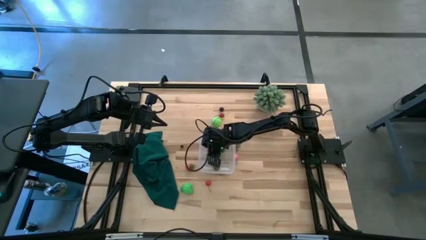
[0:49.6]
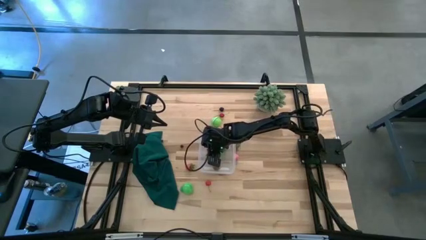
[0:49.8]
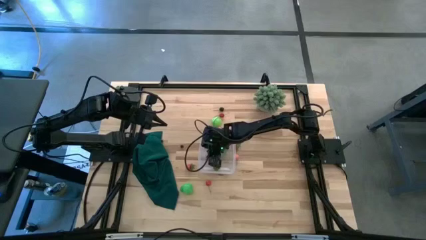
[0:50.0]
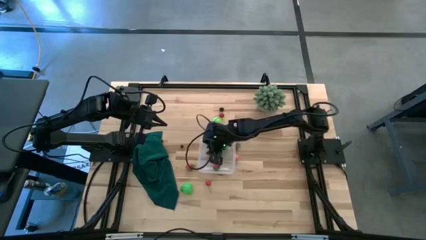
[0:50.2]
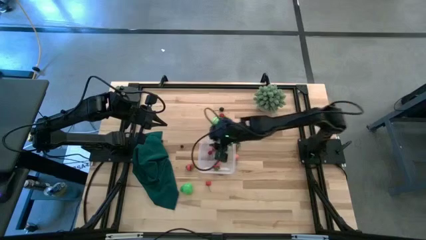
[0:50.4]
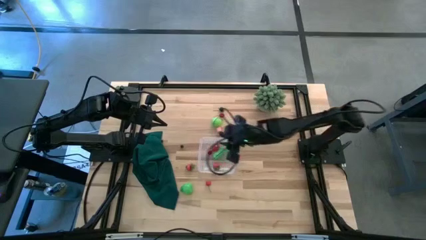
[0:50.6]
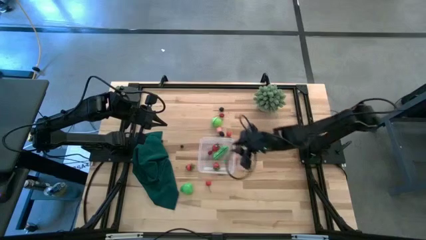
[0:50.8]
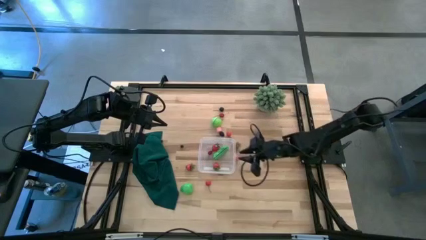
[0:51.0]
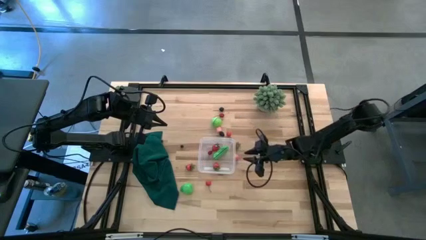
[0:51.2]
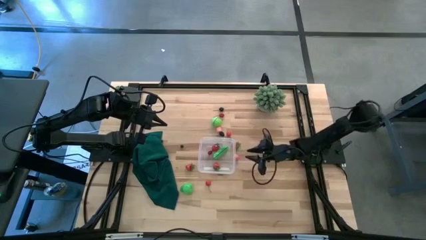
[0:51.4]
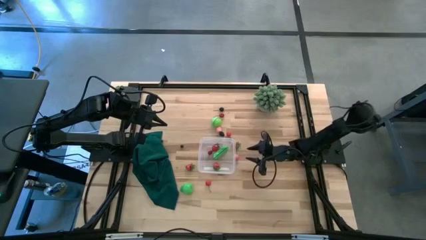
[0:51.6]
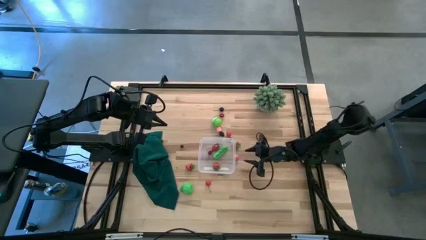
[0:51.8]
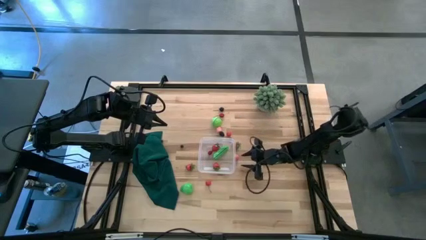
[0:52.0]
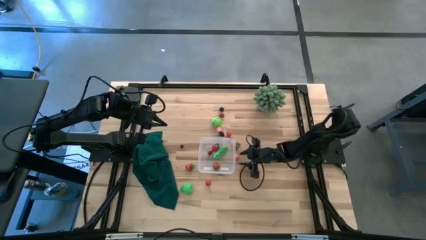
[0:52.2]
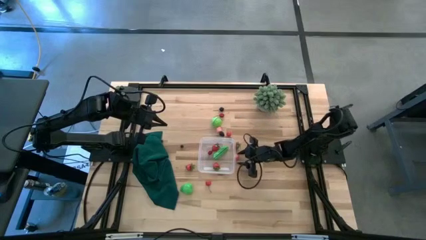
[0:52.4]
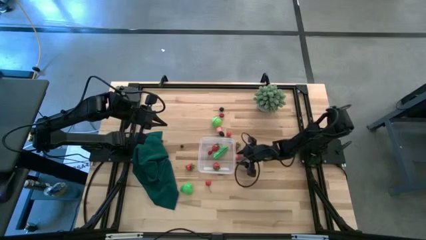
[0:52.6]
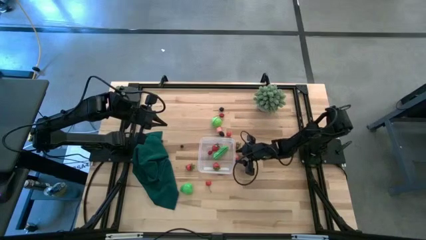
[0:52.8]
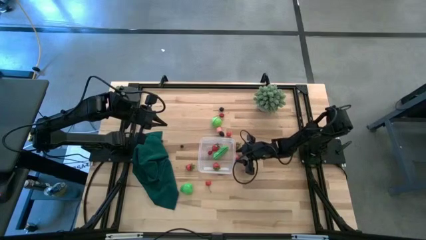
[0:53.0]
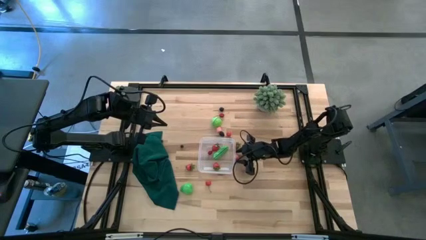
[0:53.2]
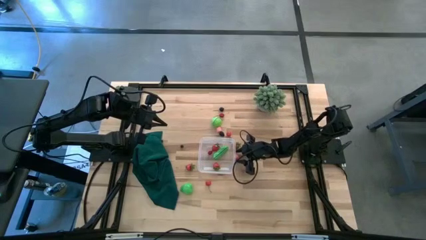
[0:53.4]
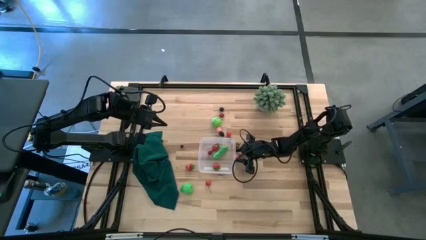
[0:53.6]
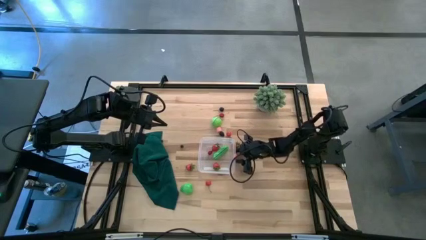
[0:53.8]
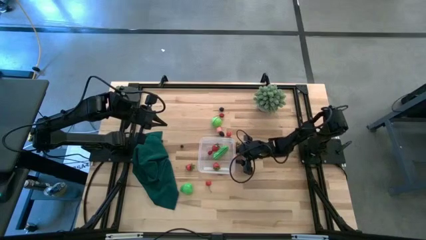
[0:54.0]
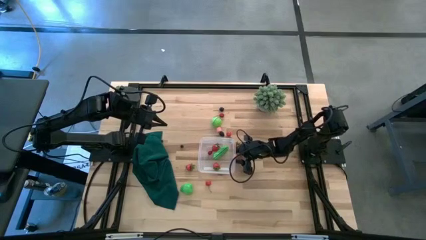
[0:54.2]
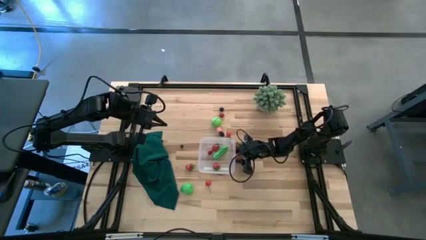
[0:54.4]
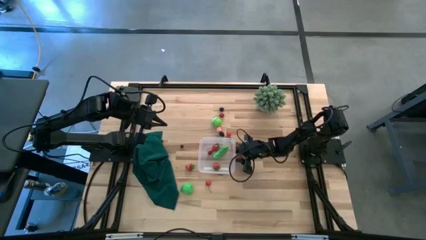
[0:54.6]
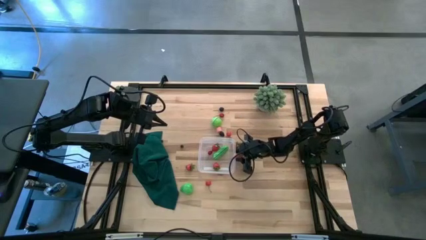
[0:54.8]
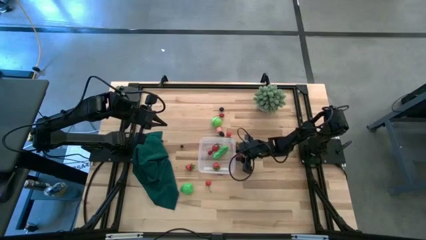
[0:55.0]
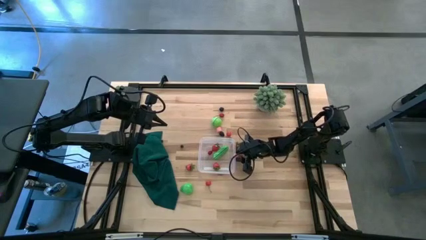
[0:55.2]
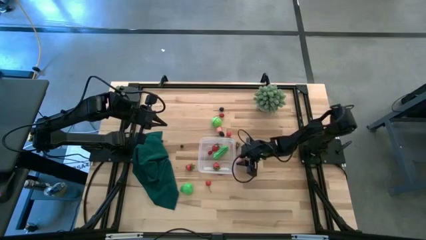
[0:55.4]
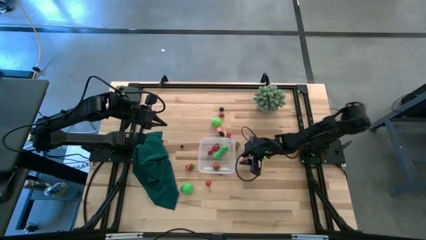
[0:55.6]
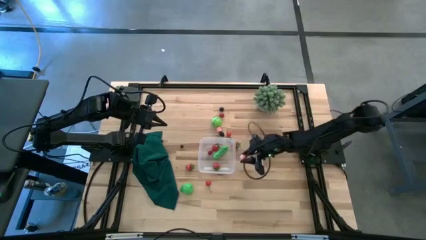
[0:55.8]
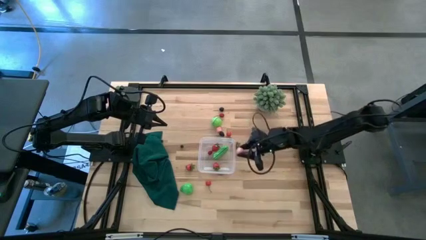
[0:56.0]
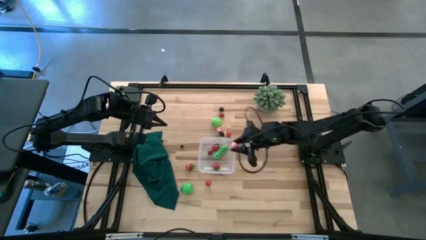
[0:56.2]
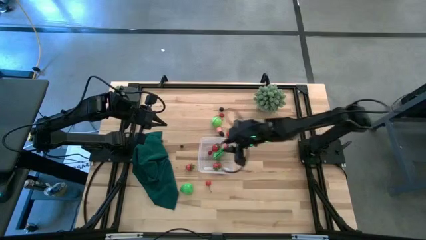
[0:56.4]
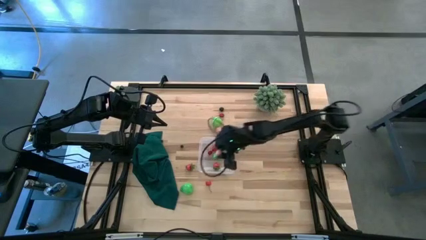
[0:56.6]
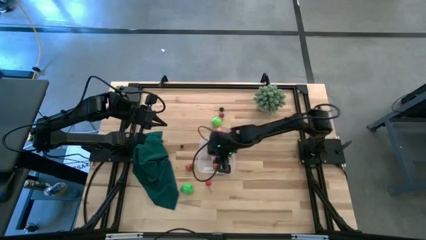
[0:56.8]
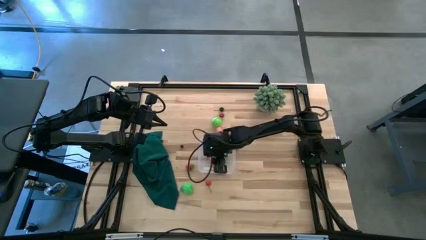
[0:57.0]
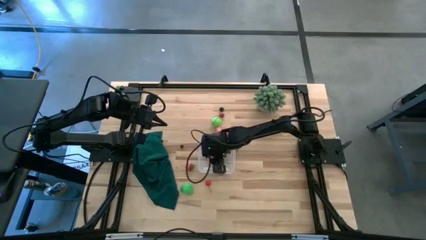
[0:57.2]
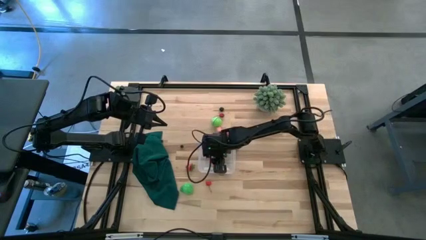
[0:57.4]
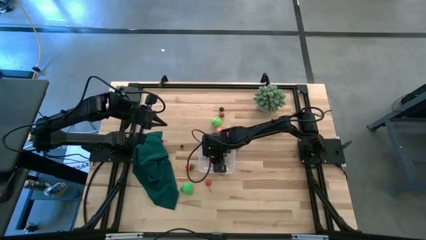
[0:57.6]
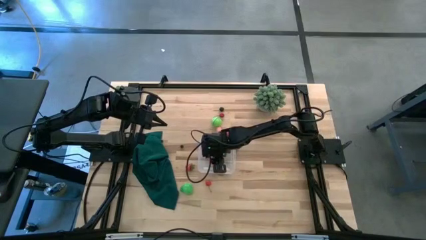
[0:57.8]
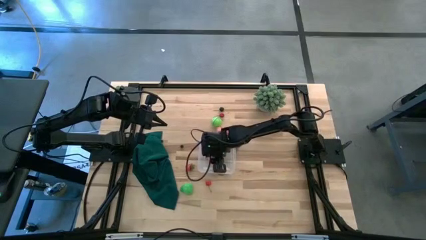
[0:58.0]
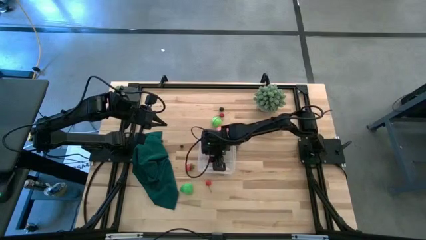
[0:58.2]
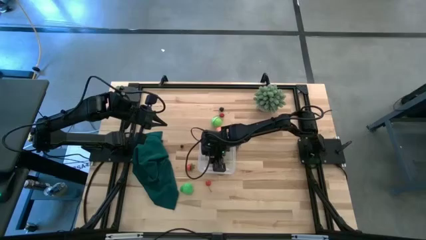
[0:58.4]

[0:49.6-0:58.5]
Task: Pick and placing Produce into tupperware
Put the pink peach into the transparent bin

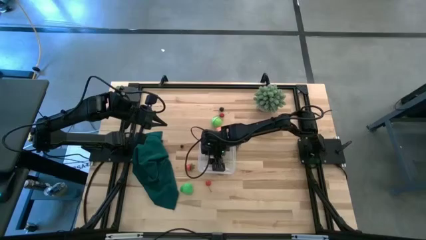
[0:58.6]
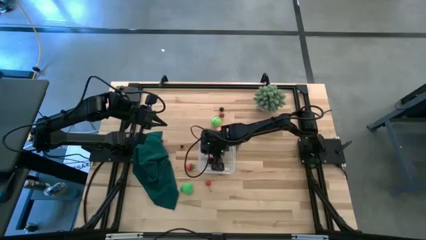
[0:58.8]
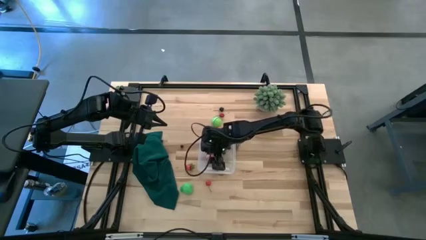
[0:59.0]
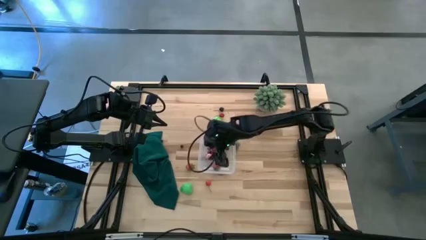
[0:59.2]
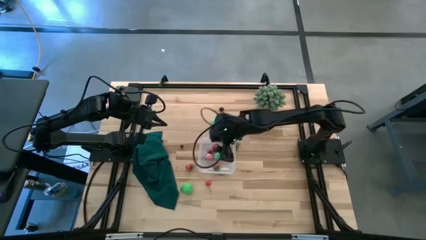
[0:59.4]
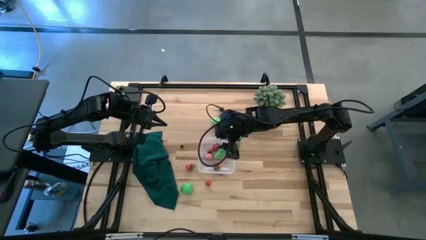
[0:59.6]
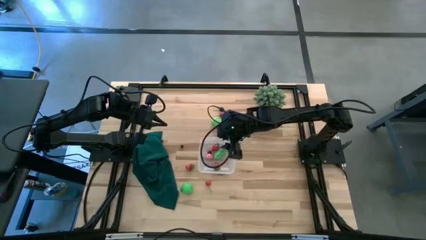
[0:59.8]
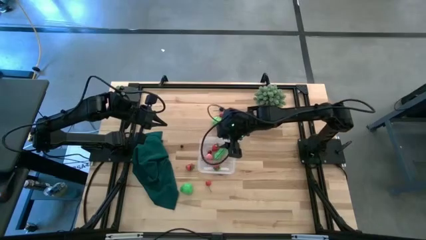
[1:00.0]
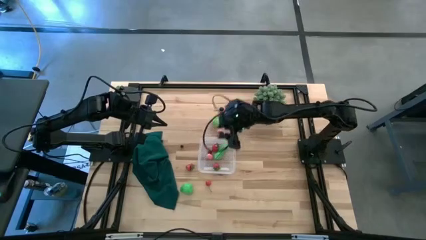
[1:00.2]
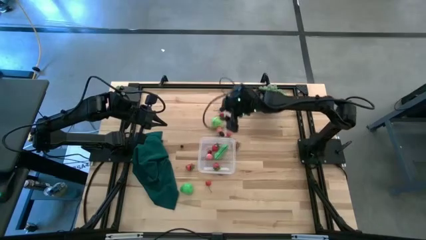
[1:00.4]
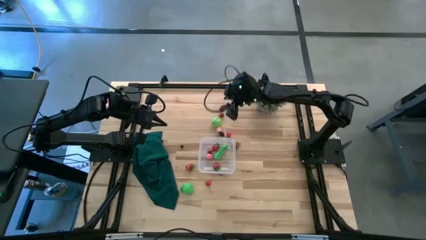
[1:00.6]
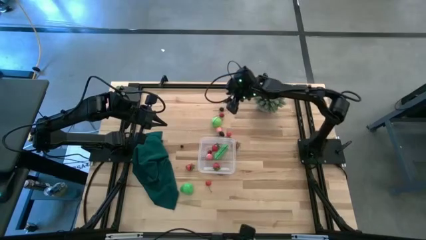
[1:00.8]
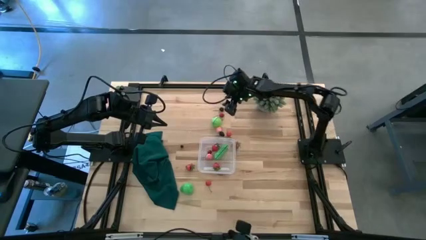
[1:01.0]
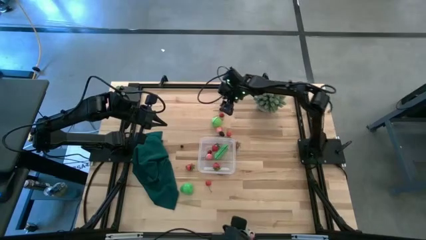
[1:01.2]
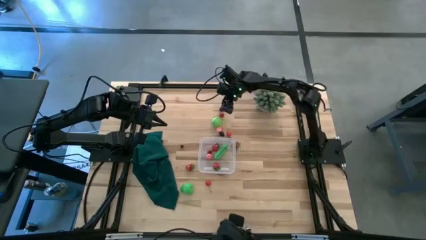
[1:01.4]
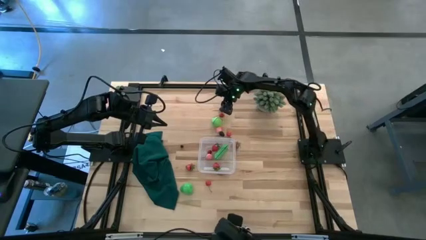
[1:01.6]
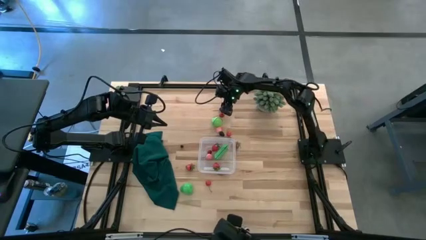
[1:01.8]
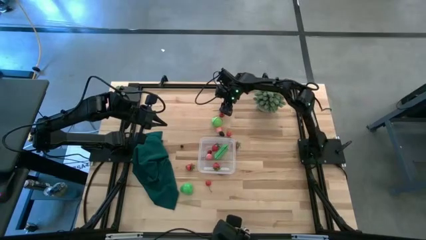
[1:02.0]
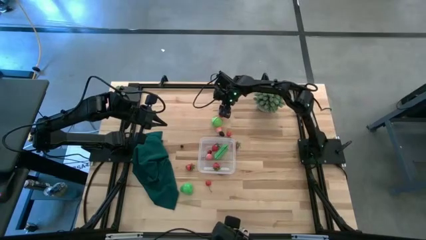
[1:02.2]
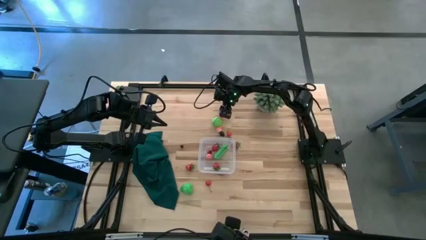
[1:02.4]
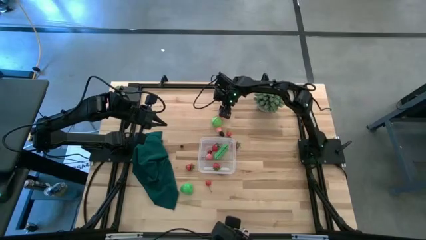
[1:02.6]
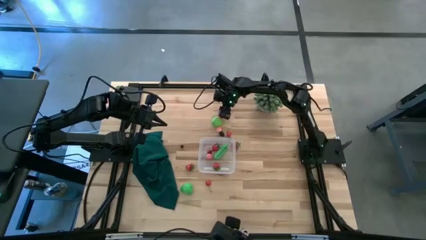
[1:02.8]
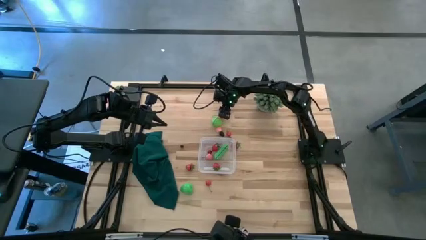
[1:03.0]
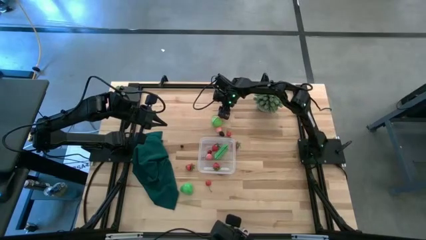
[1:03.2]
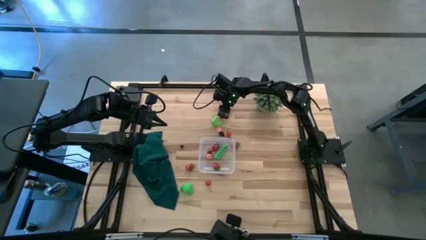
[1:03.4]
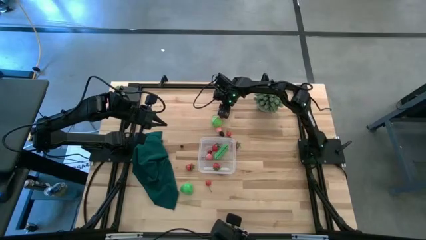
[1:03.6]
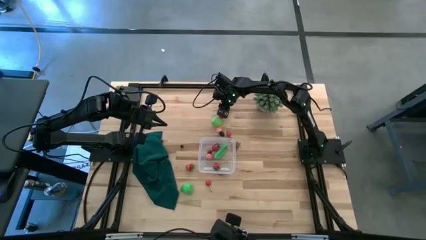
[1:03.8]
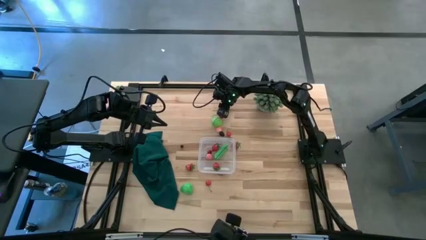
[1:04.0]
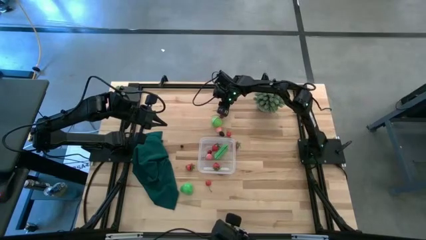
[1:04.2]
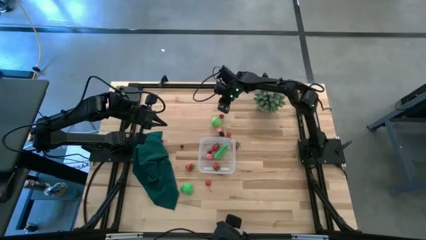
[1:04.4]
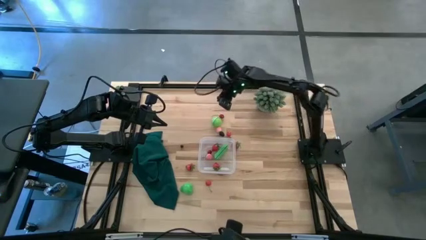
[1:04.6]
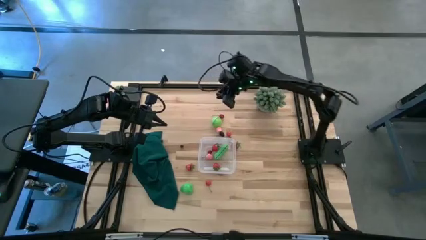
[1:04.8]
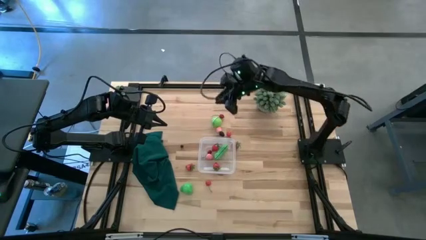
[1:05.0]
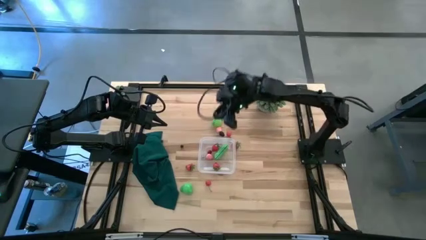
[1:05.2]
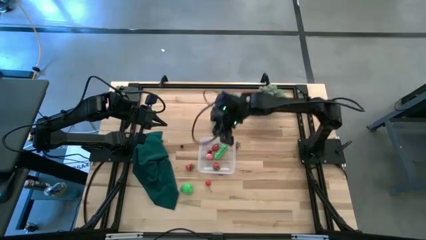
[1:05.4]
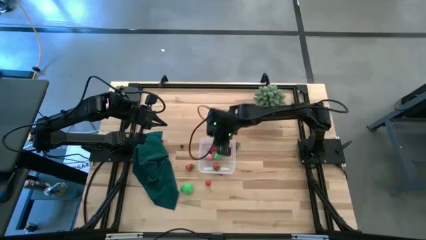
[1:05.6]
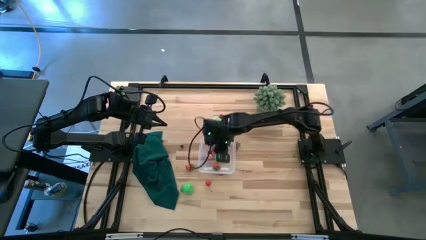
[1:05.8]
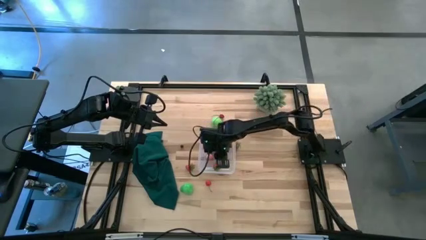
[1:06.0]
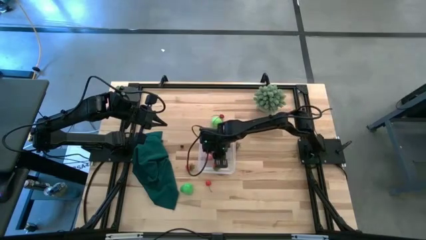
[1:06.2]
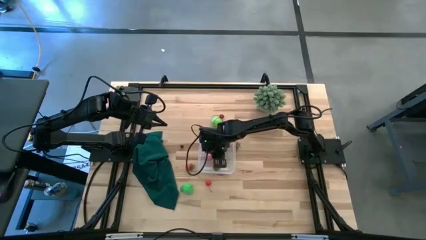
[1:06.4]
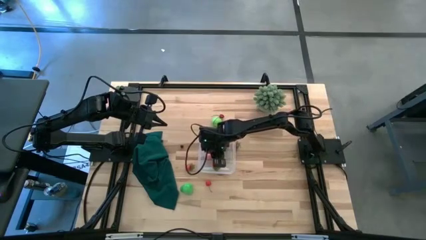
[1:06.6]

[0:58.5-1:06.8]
Put the black cherry into the transparent bin
